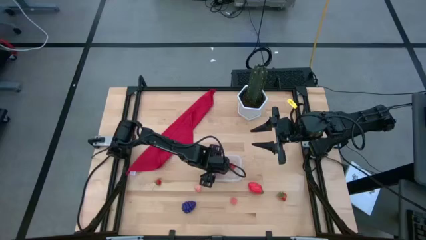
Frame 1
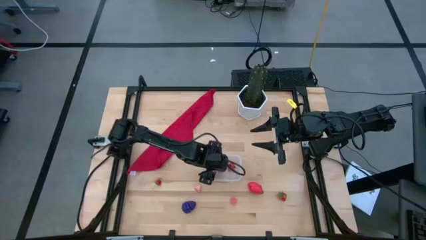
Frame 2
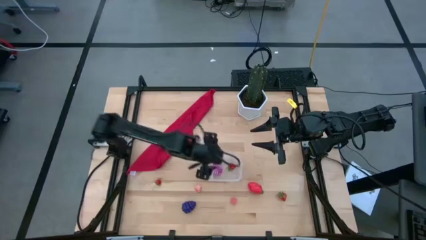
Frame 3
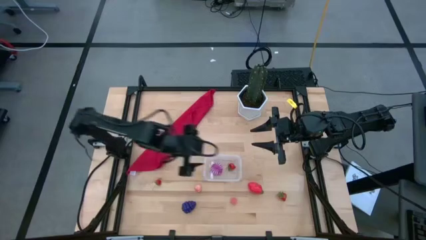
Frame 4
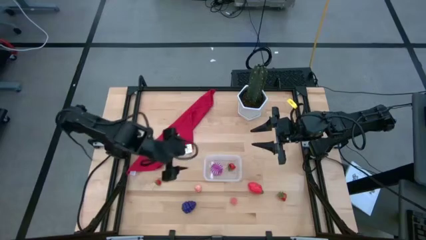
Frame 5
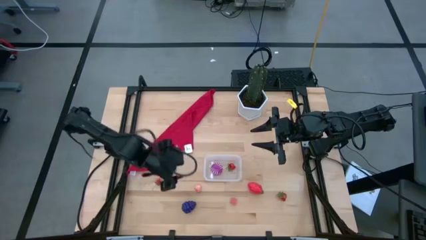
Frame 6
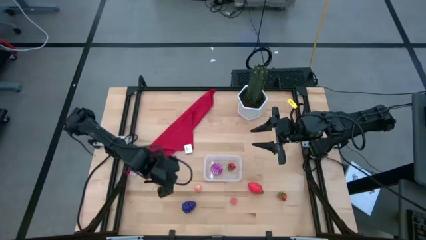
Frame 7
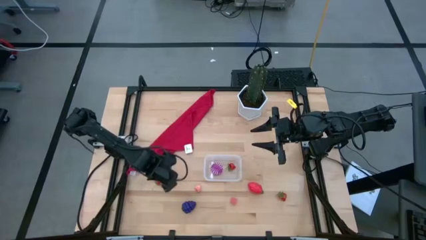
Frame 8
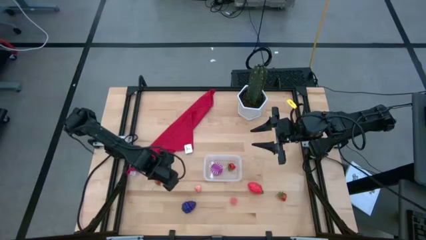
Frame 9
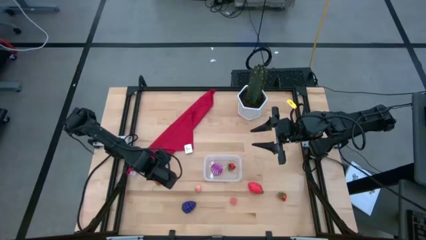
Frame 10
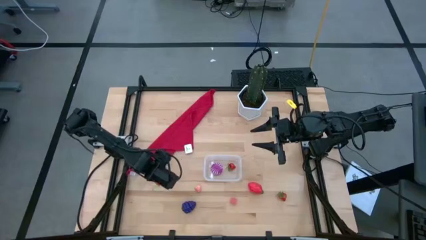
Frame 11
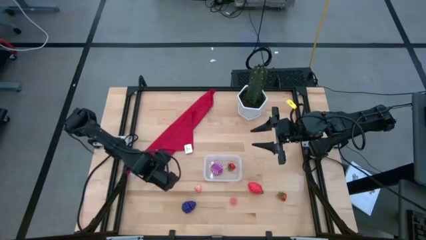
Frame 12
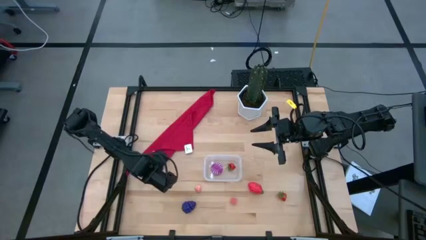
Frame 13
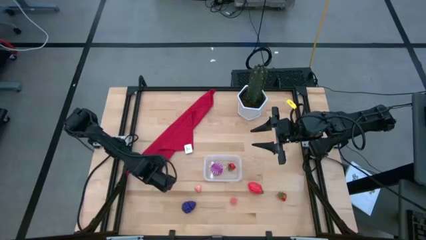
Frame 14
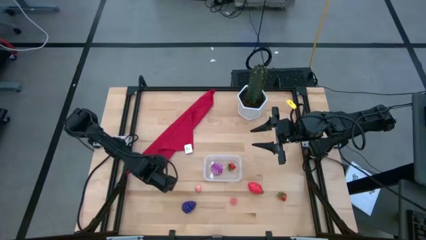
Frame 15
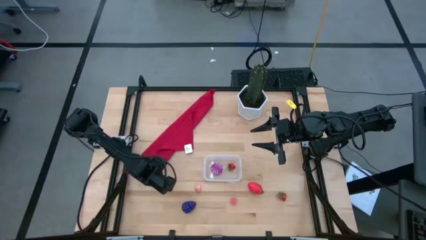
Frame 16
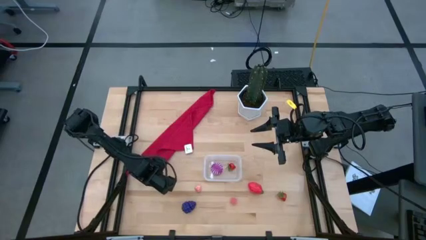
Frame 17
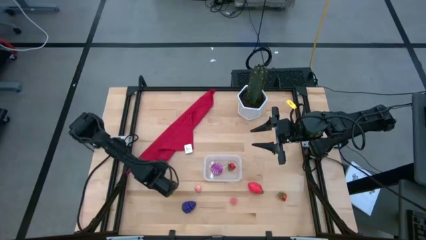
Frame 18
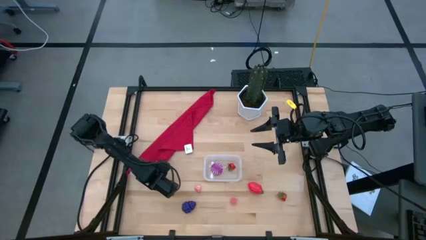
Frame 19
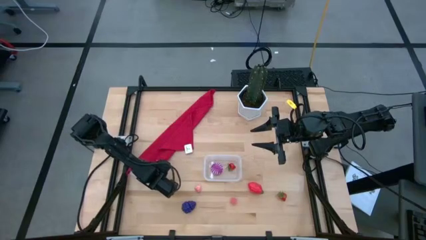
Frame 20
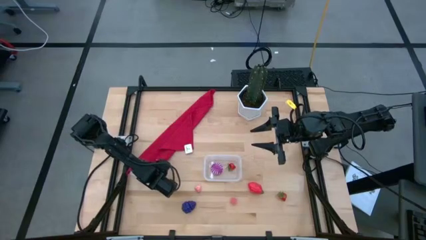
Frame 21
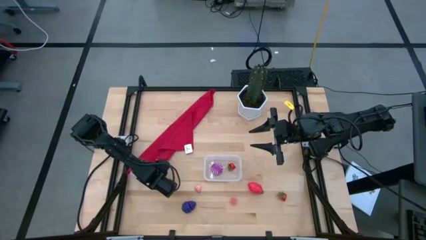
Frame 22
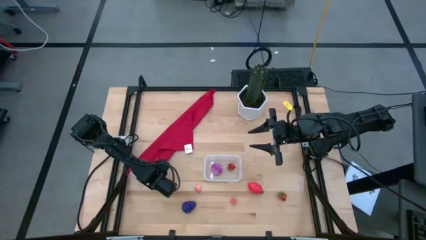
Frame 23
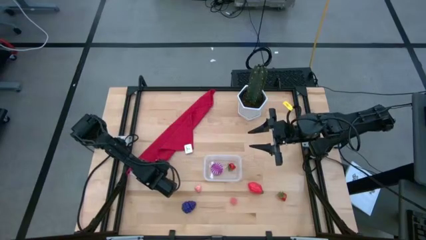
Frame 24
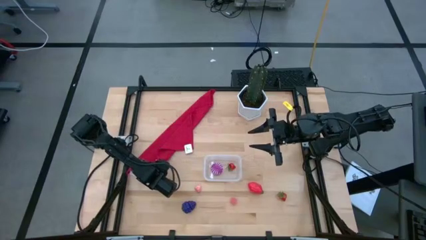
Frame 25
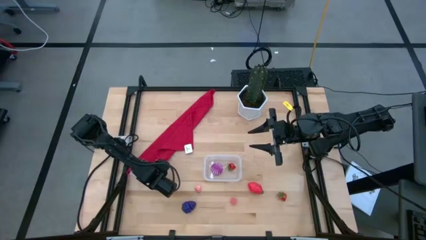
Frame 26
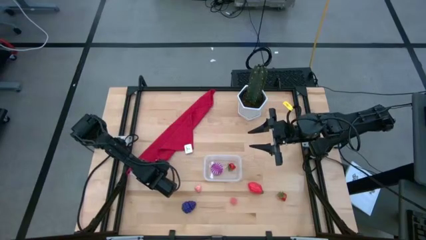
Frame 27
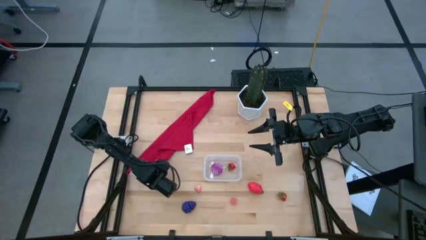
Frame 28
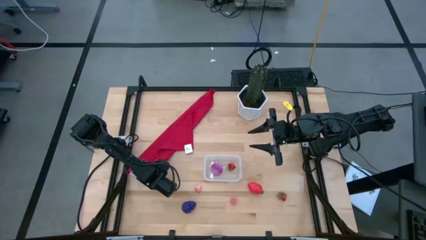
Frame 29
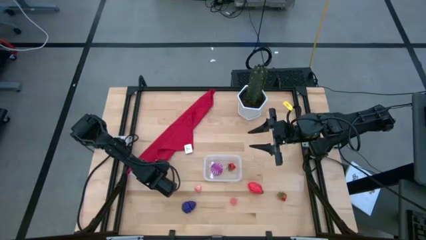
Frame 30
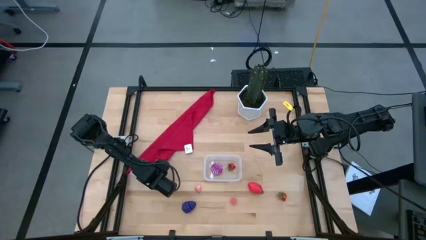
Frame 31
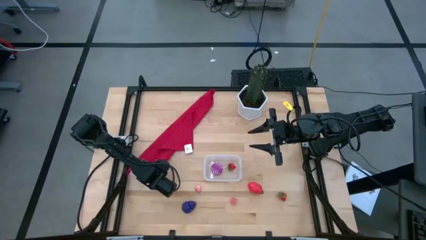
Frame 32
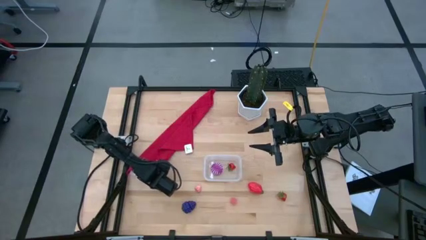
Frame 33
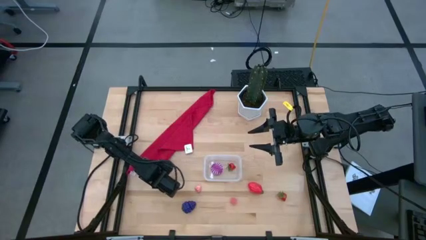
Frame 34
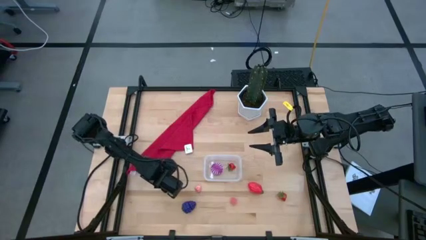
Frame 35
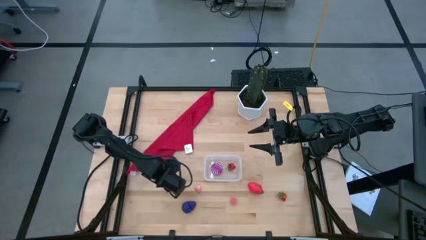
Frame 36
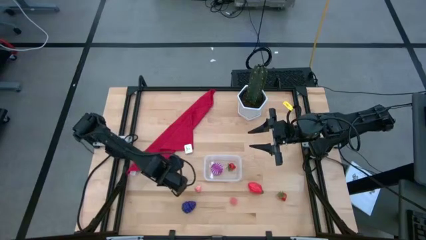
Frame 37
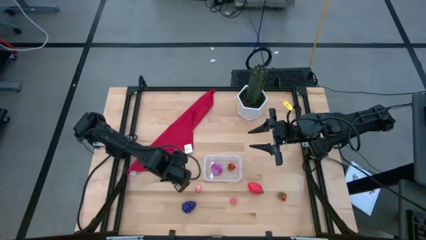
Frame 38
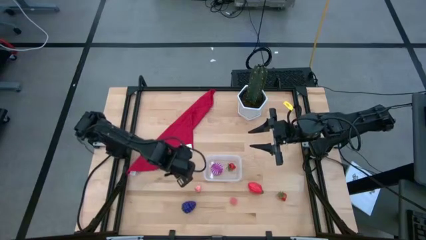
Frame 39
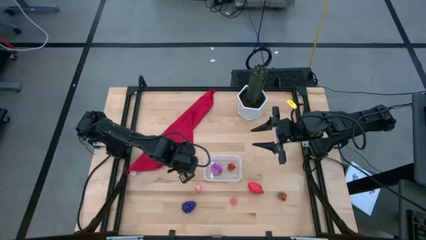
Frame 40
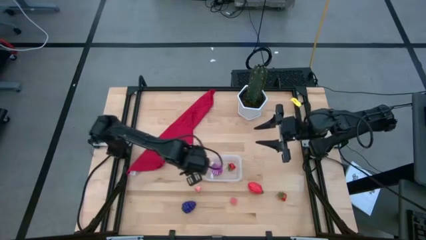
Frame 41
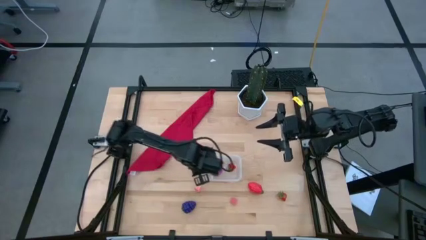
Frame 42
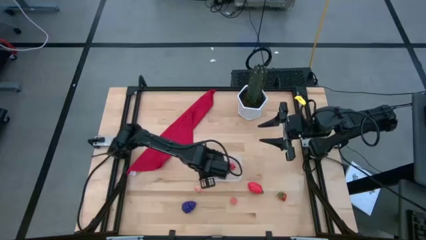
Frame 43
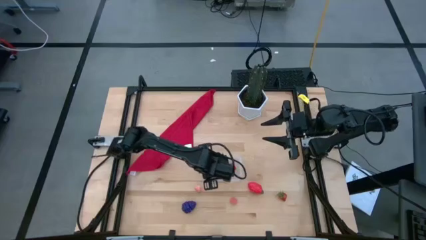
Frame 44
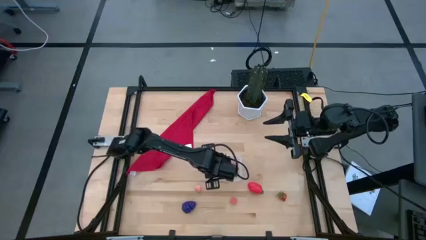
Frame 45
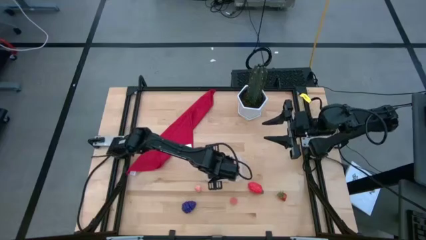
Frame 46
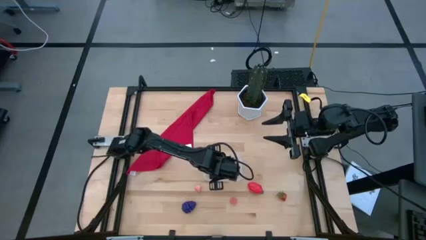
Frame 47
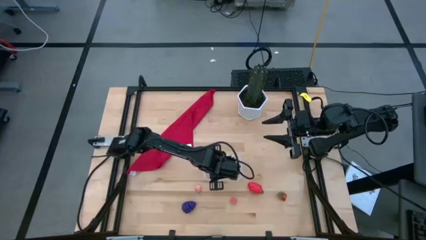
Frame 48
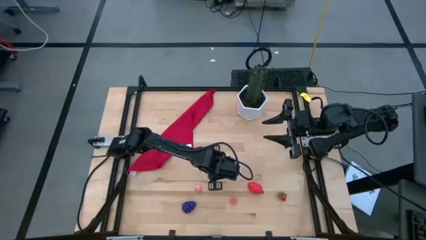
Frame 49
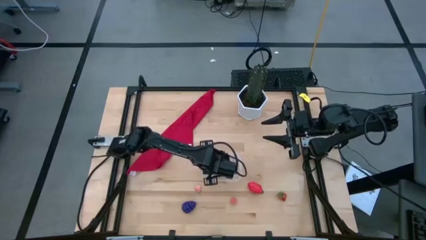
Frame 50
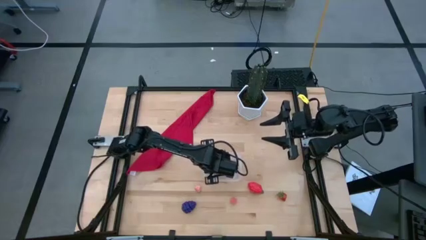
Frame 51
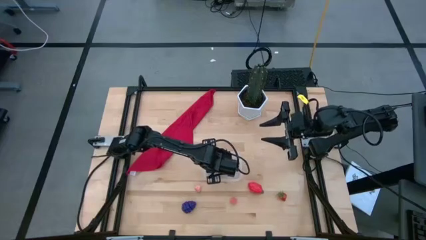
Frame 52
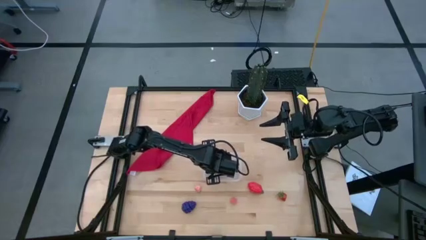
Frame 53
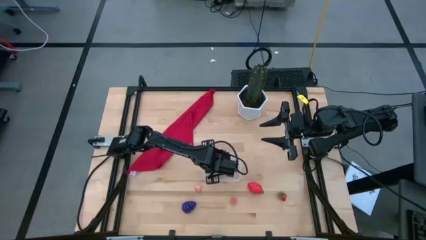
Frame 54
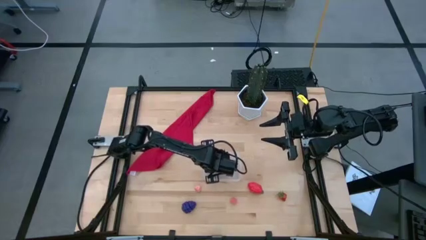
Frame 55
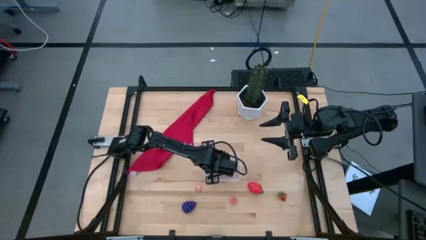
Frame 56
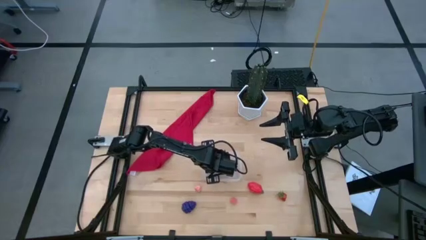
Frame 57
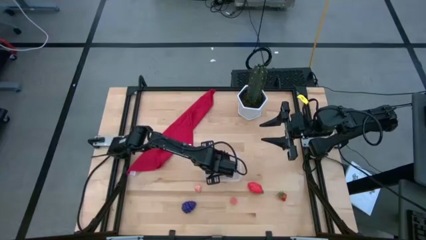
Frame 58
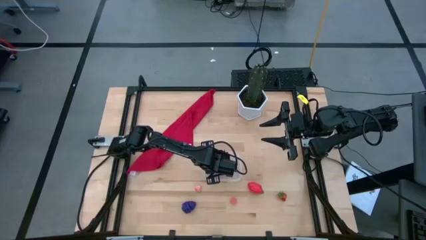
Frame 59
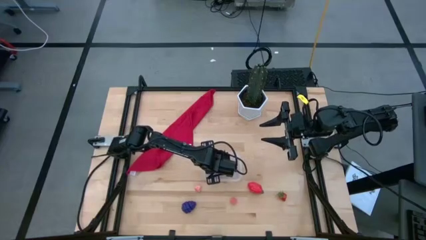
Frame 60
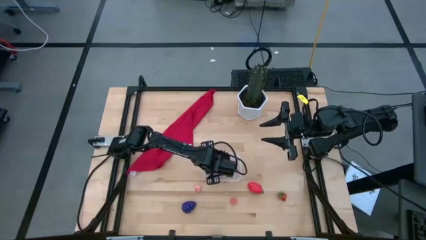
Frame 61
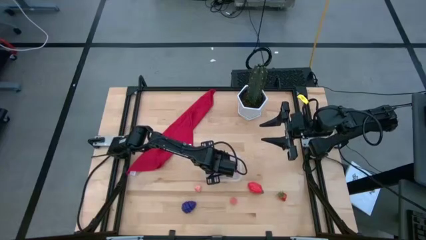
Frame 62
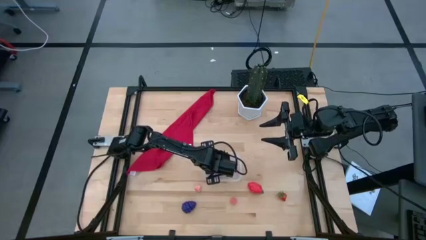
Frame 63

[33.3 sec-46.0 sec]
Task: Pick and placing Produce into tupperware
Put the left red strawberry into the transparent bin
